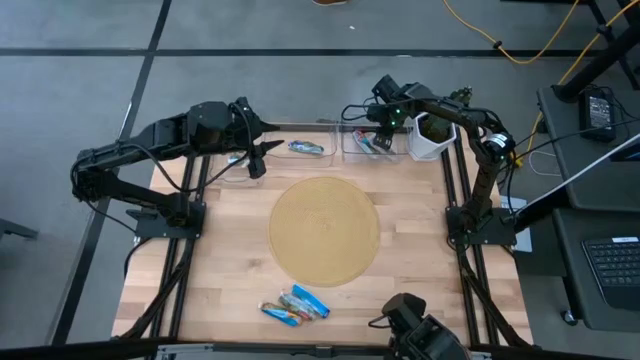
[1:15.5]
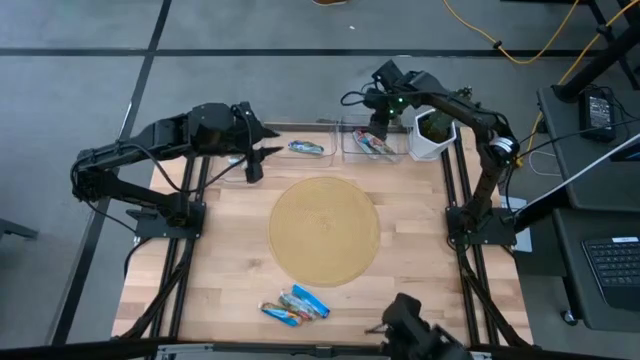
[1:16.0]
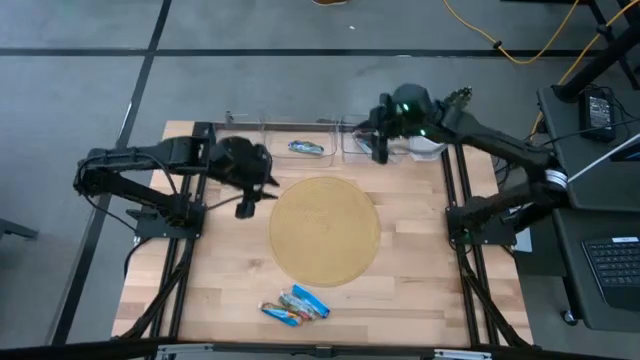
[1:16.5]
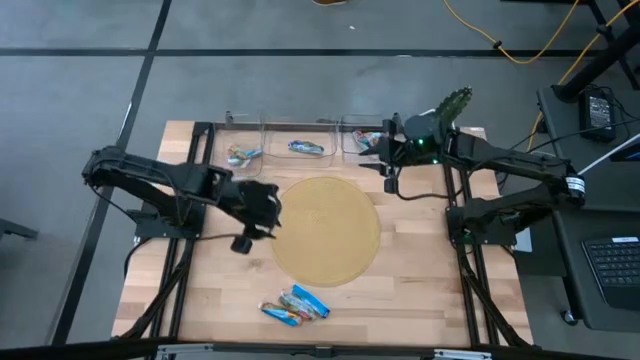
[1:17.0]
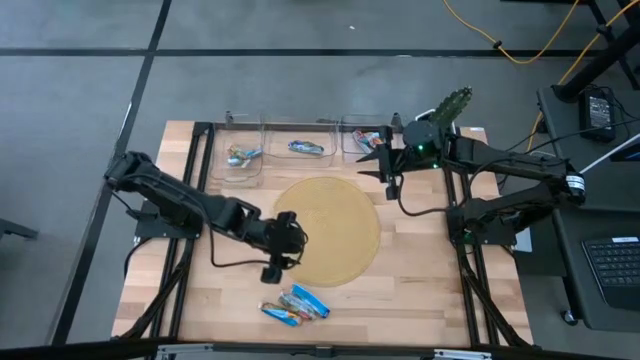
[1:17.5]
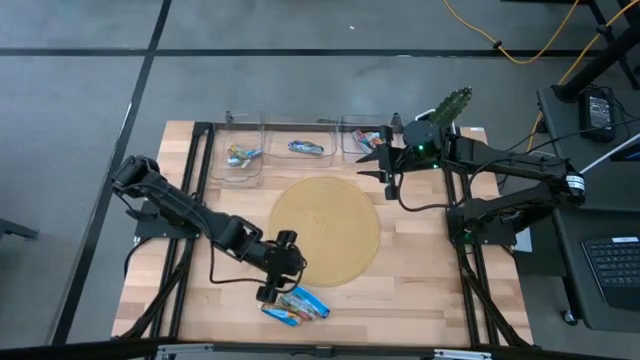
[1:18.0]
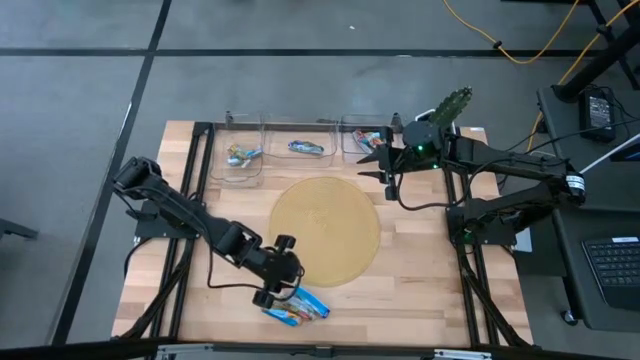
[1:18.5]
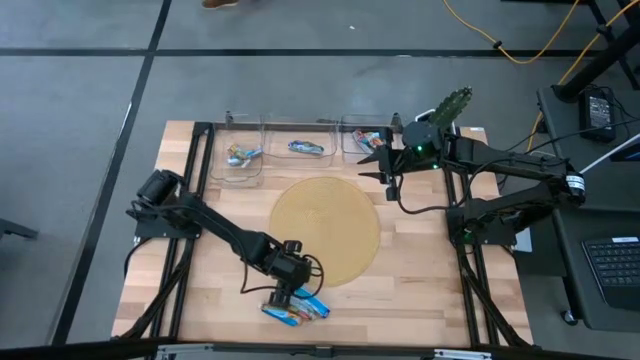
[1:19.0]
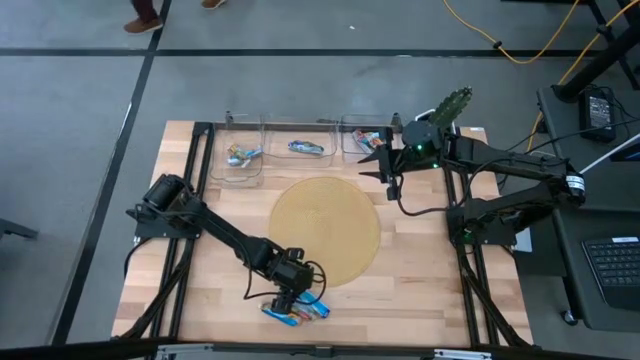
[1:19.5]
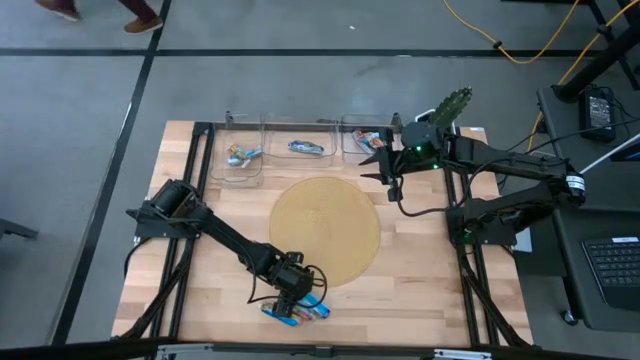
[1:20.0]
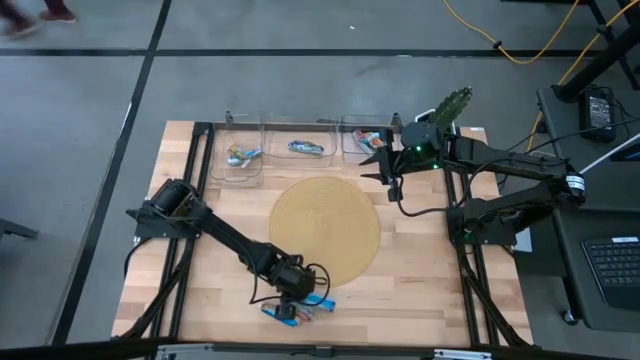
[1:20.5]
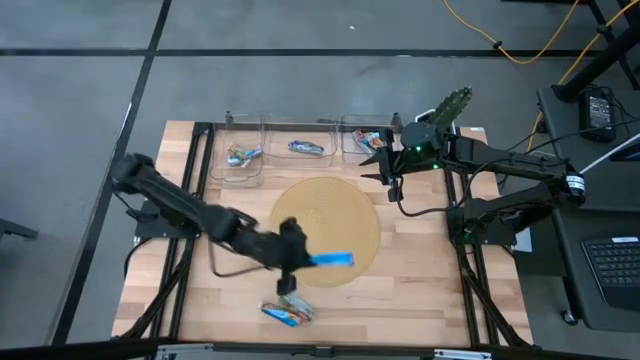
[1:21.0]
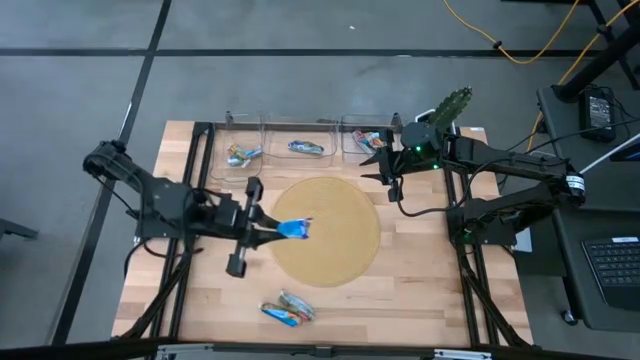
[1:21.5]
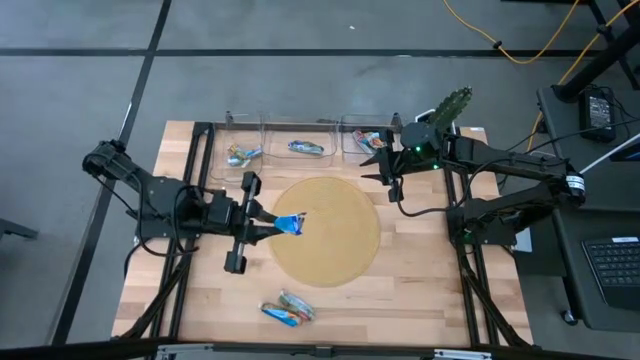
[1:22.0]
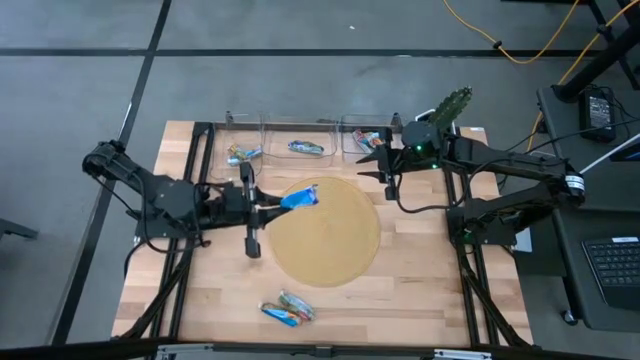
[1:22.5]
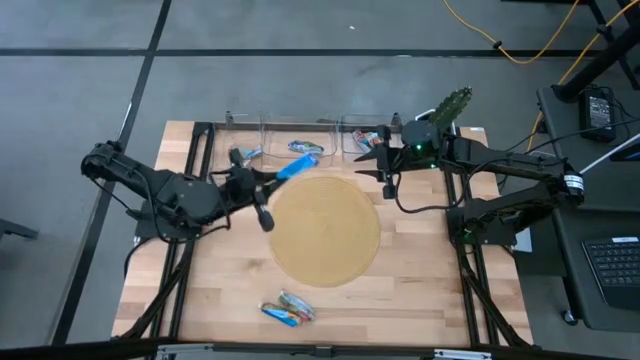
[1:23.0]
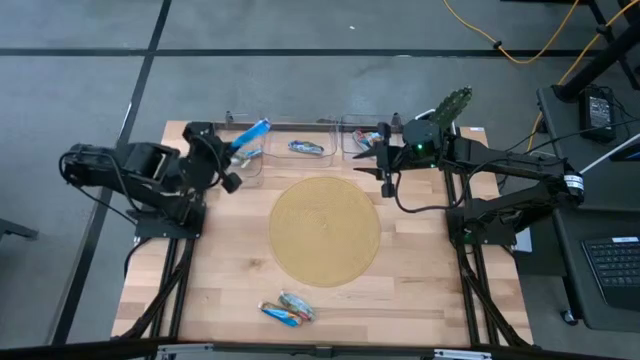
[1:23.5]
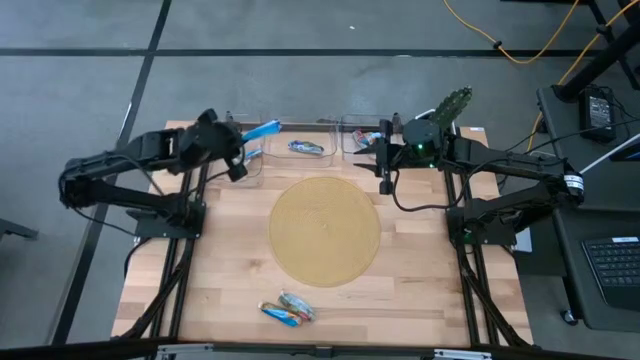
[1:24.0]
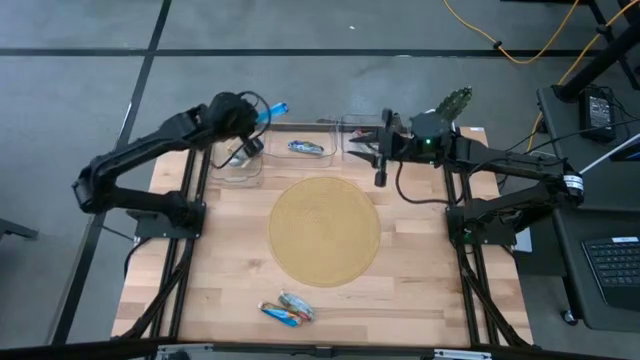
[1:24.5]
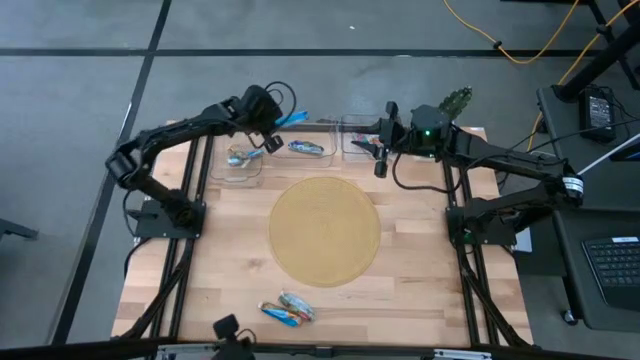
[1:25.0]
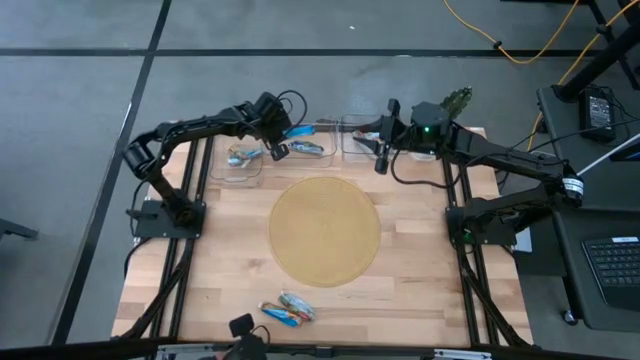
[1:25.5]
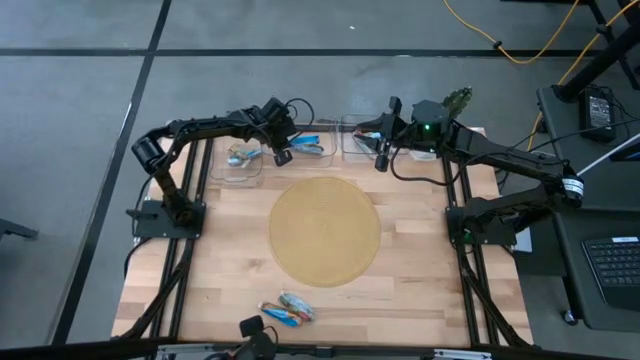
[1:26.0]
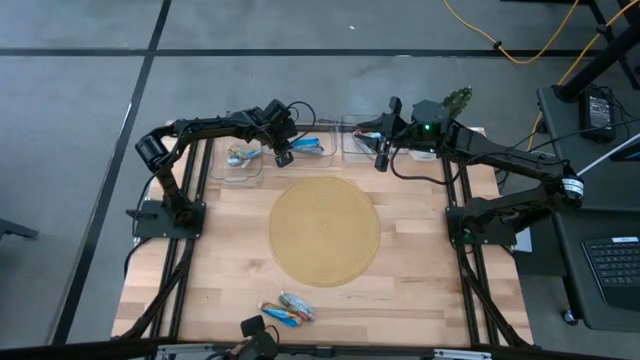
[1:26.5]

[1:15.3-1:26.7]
Task: Pick and place Granola Bars by type
Put the blue bar into the middle transparent bin

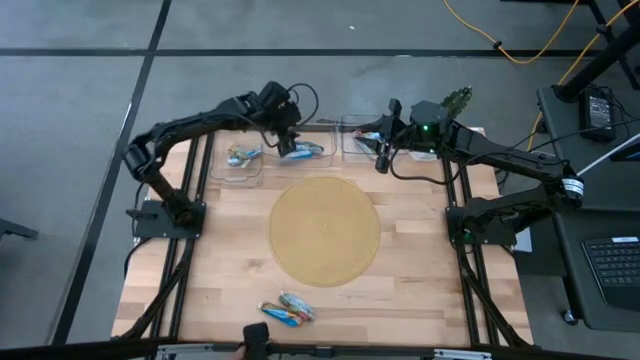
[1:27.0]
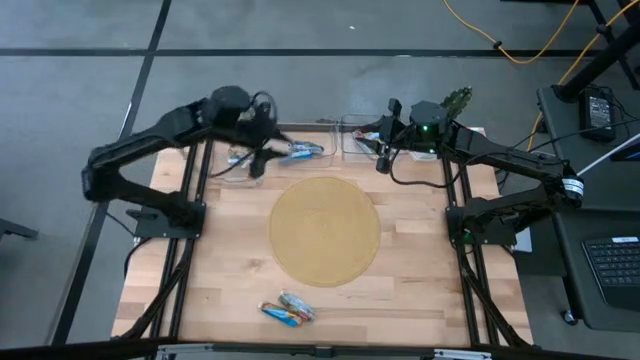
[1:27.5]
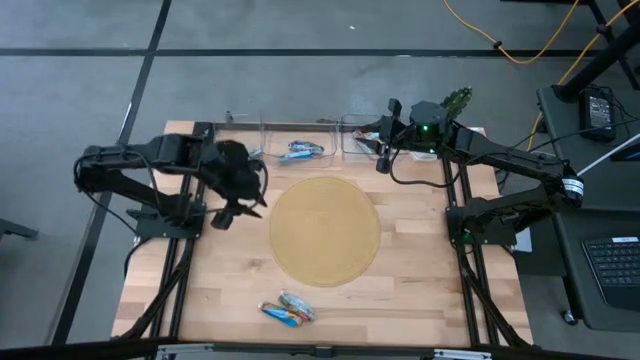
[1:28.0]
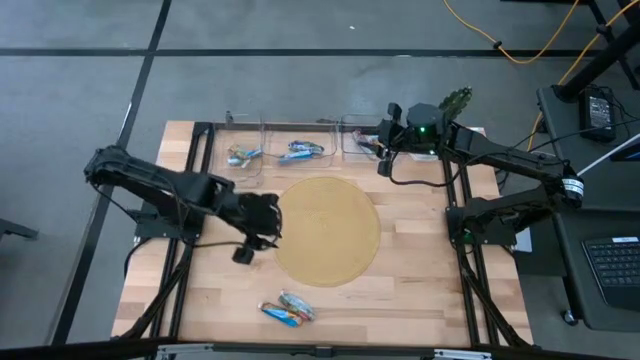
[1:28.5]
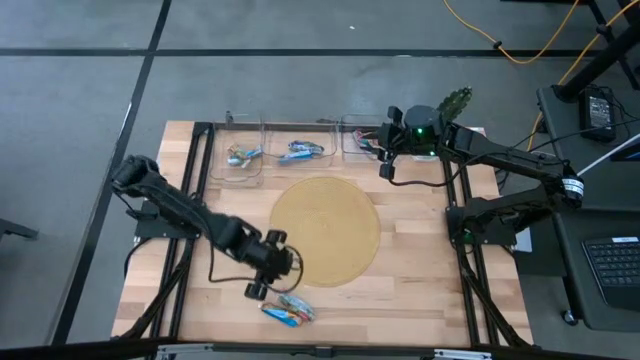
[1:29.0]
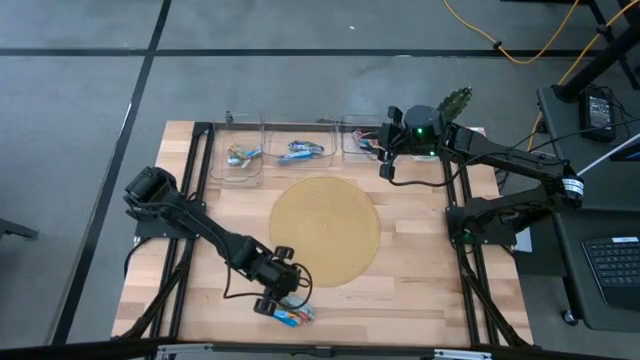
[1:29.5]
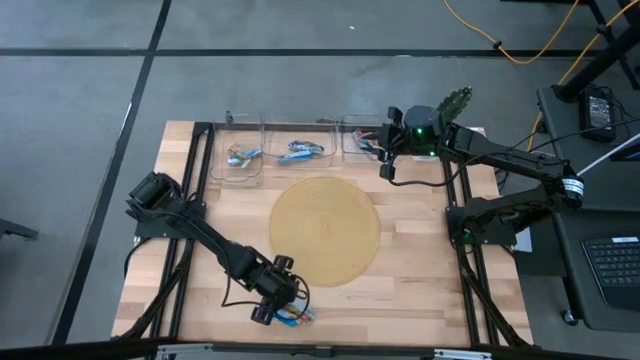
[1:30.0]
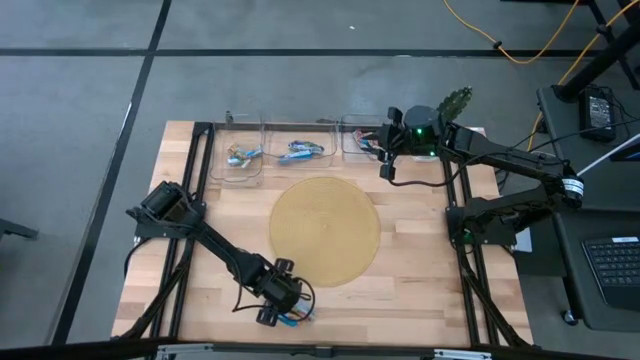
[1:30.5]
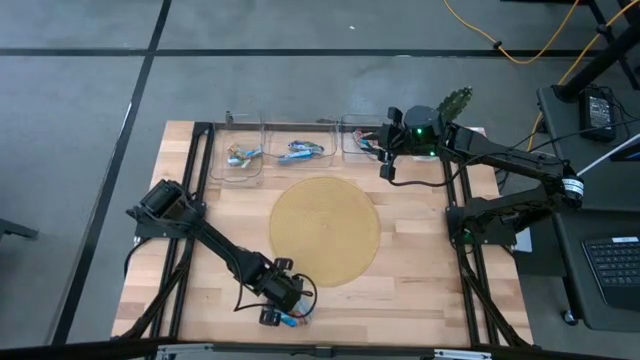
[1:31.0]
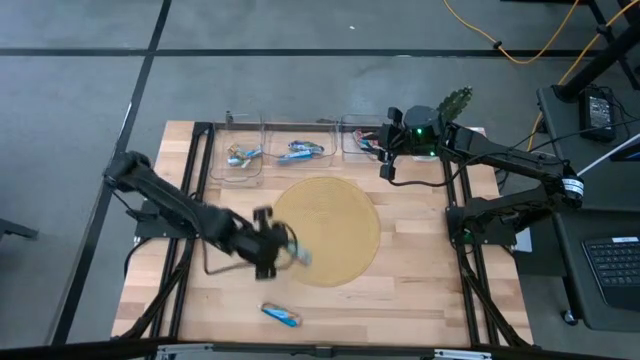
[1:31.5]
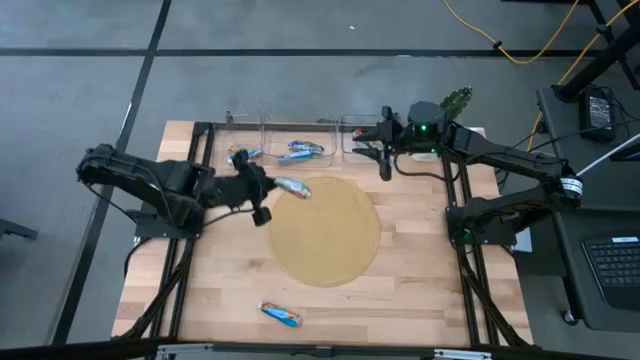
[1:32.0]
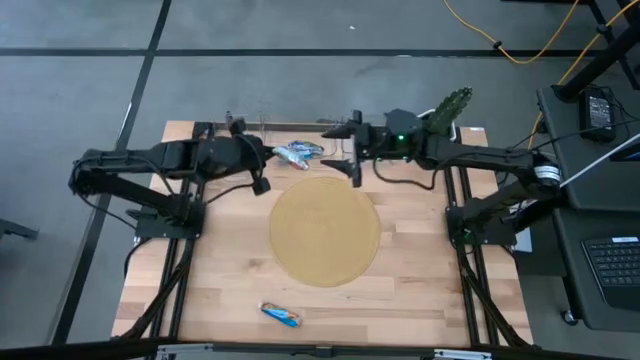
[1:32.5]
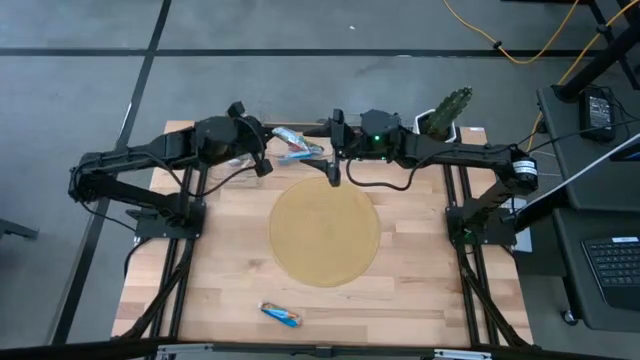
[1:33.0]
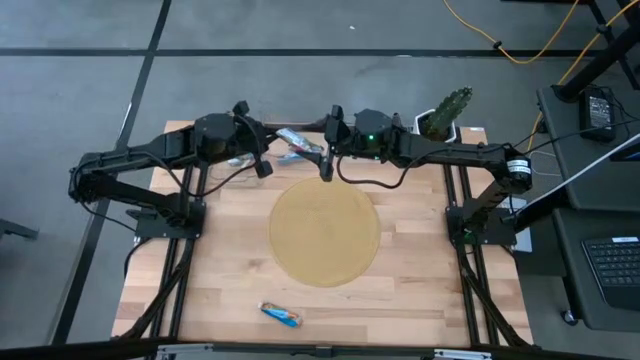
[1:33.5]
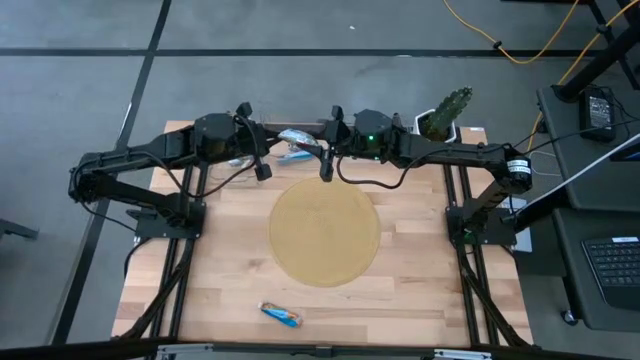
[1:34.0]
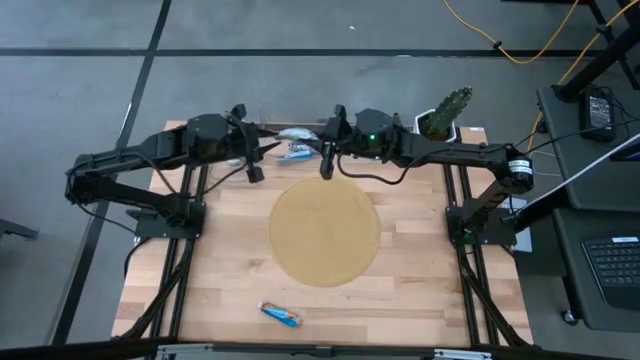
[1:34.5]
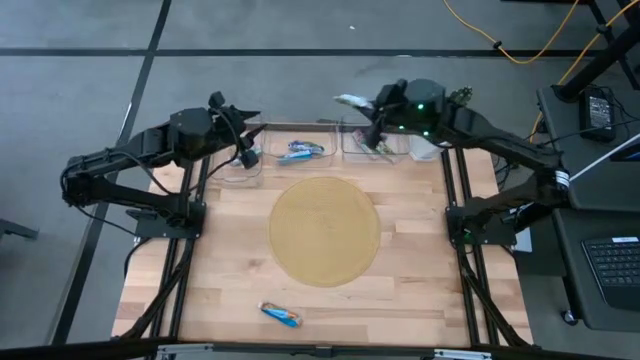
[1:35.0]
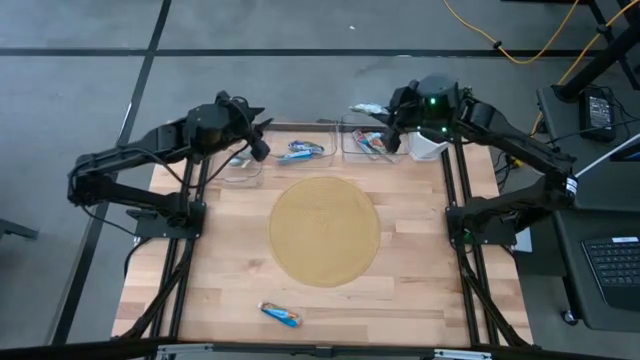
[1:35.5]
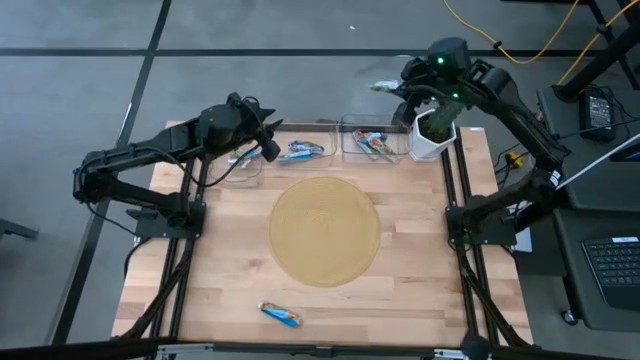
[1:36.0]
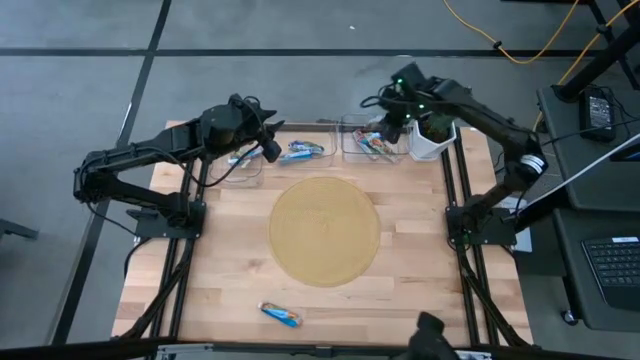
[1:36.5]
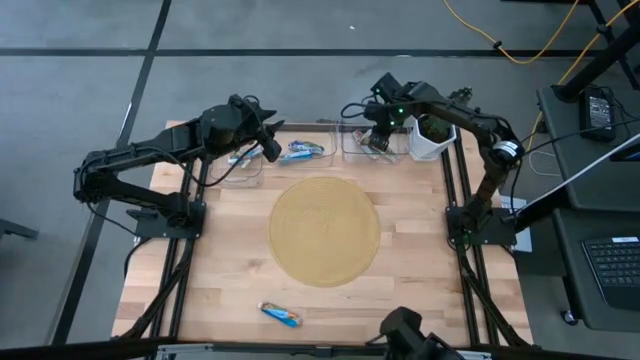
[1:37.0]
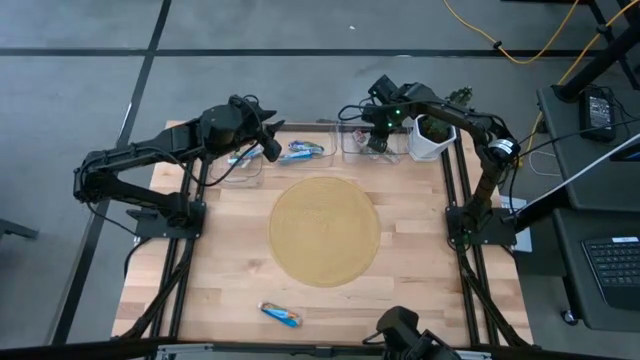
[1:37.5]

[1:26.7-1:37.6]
Put the red granola bar into the right transparent bin
